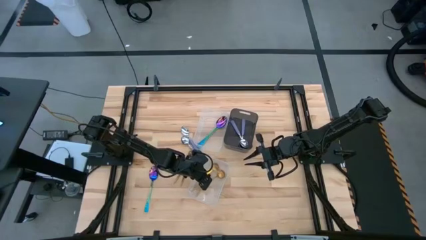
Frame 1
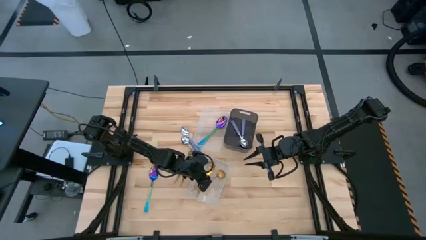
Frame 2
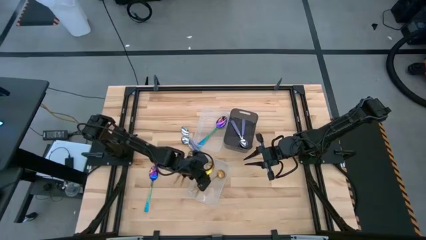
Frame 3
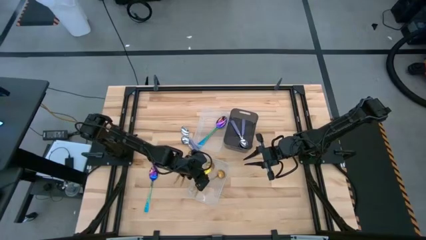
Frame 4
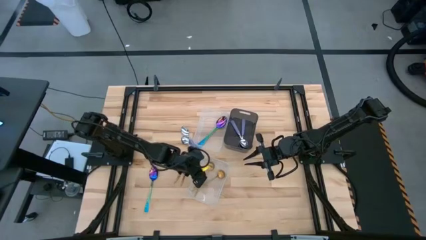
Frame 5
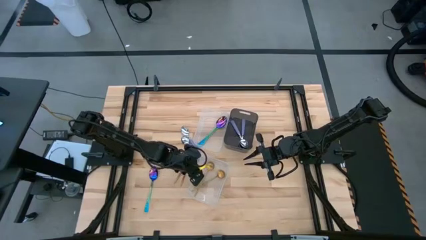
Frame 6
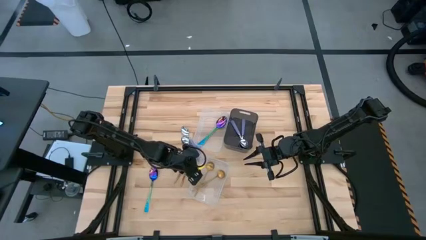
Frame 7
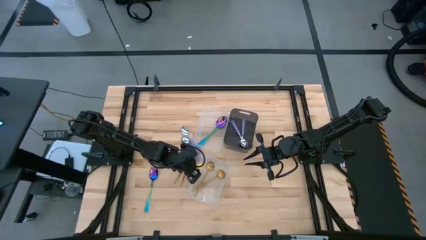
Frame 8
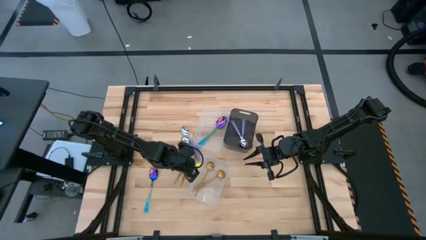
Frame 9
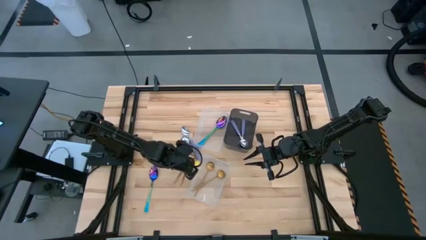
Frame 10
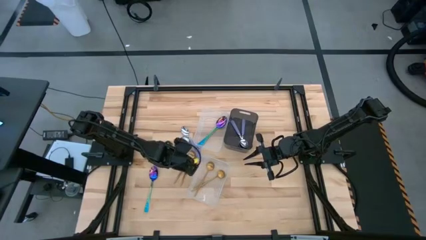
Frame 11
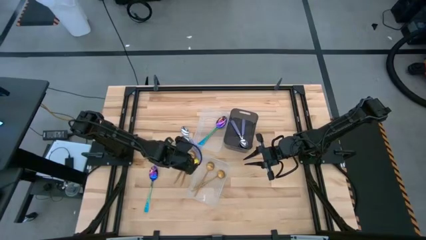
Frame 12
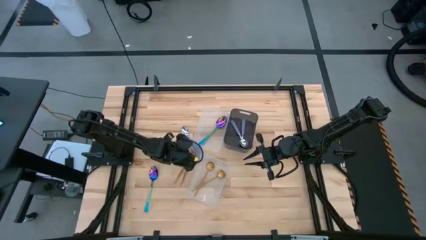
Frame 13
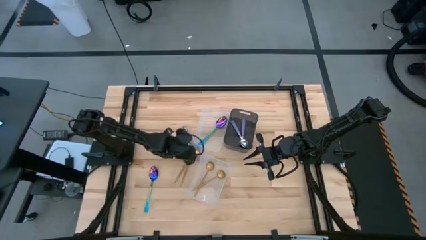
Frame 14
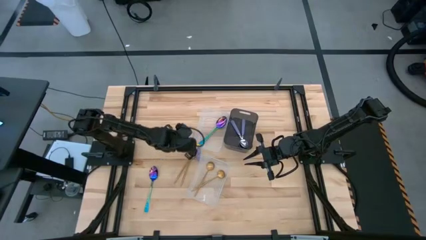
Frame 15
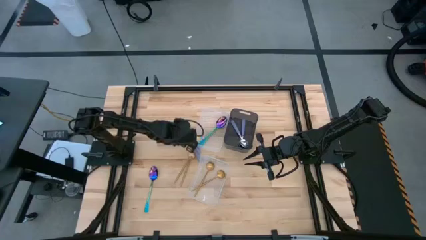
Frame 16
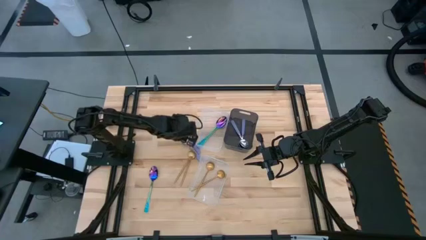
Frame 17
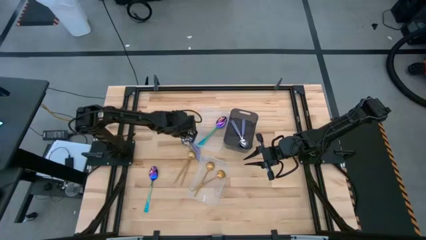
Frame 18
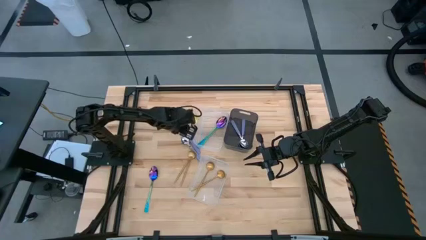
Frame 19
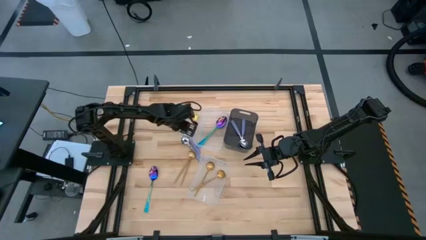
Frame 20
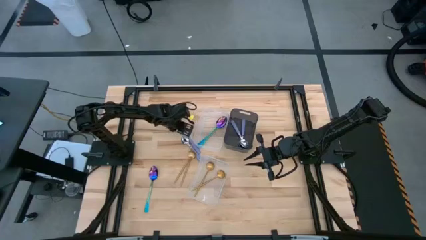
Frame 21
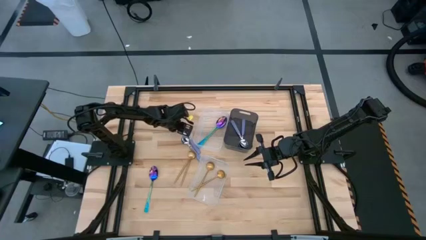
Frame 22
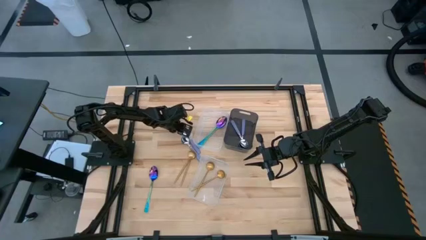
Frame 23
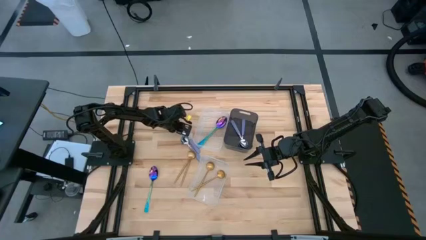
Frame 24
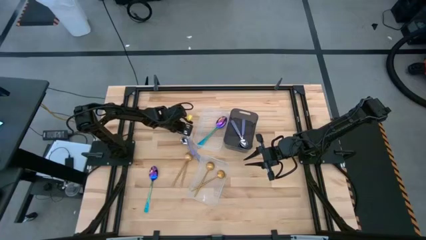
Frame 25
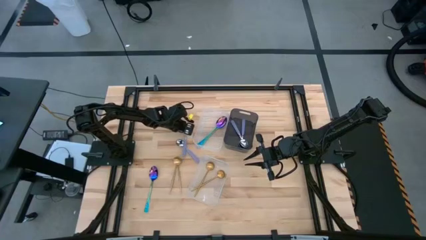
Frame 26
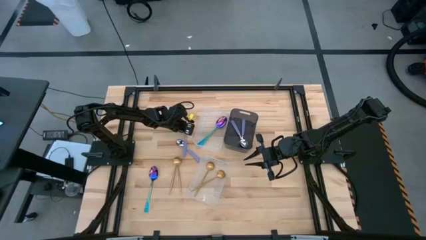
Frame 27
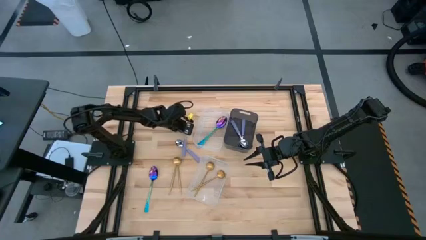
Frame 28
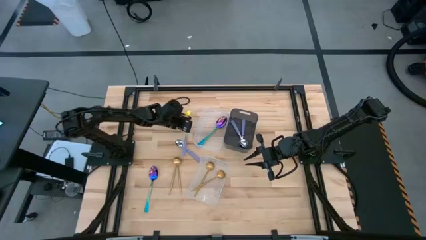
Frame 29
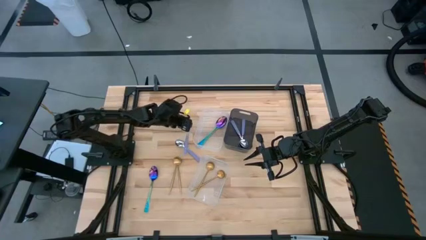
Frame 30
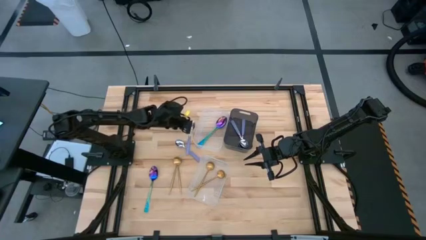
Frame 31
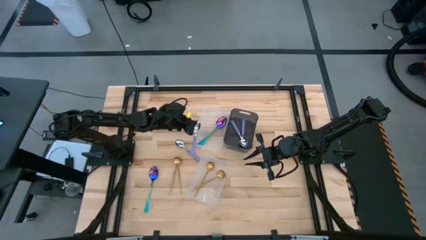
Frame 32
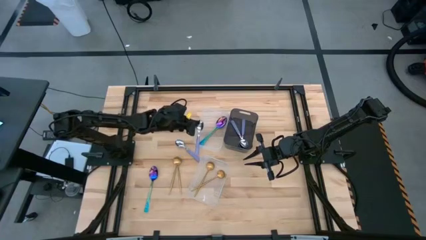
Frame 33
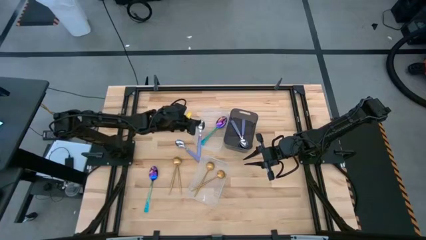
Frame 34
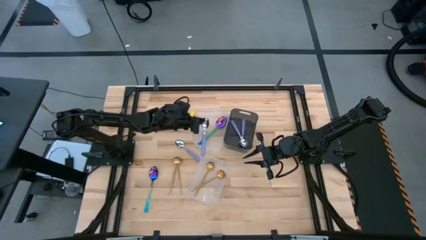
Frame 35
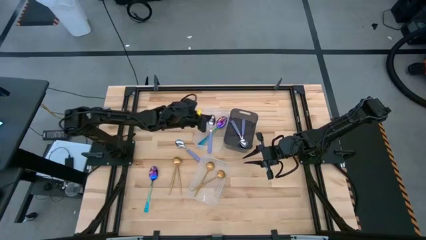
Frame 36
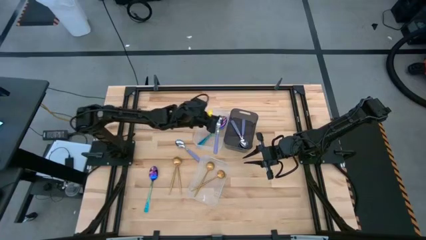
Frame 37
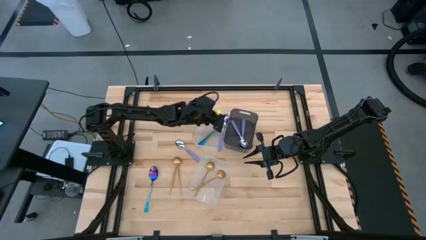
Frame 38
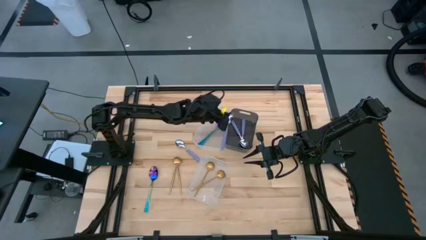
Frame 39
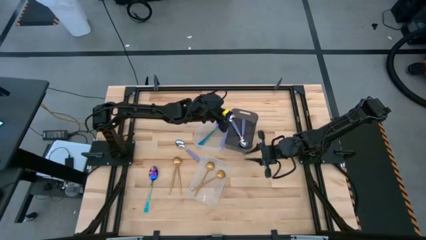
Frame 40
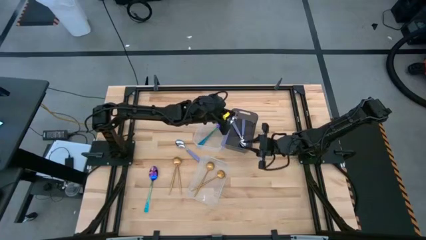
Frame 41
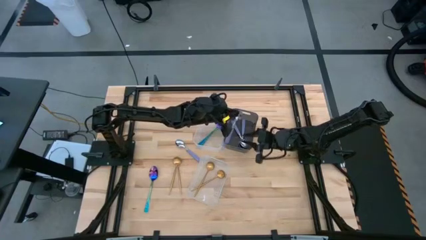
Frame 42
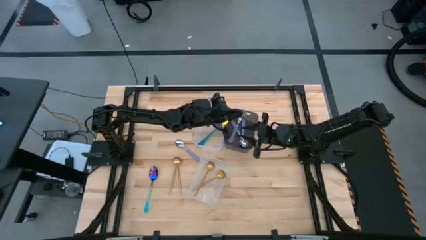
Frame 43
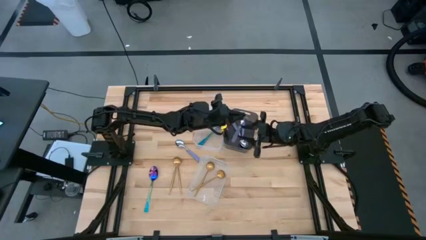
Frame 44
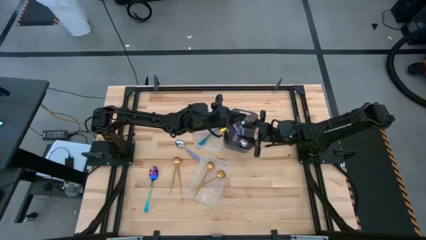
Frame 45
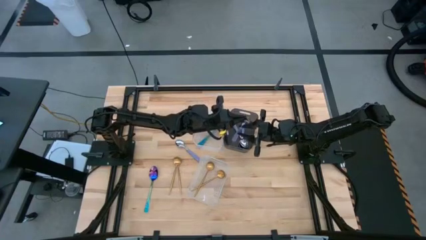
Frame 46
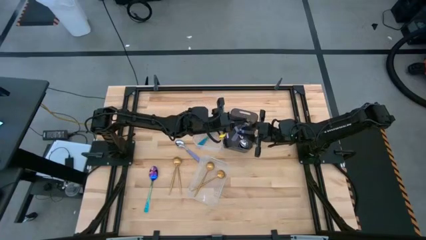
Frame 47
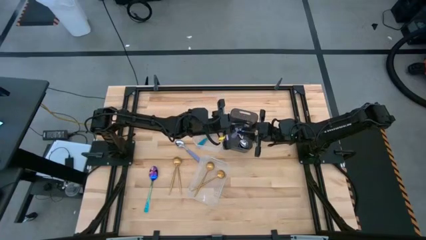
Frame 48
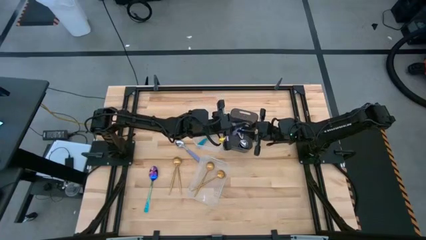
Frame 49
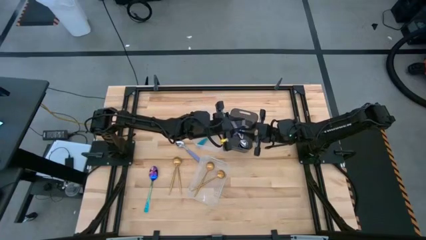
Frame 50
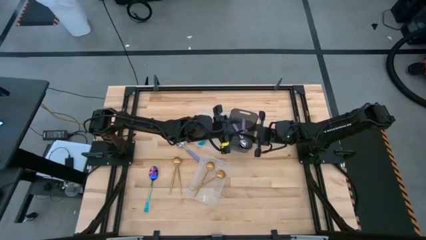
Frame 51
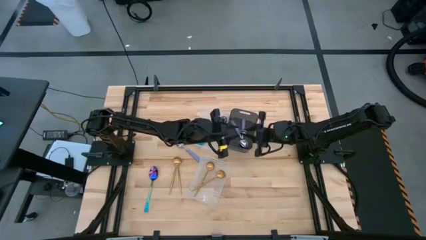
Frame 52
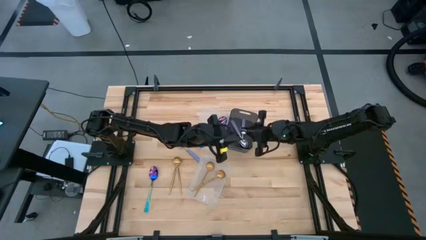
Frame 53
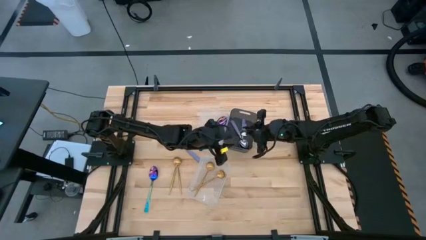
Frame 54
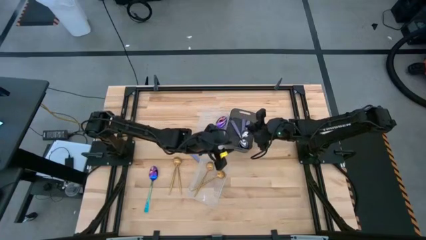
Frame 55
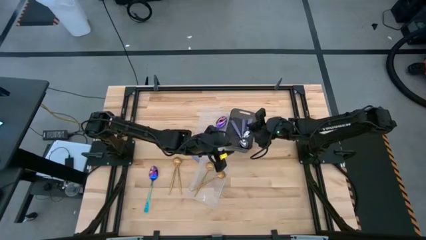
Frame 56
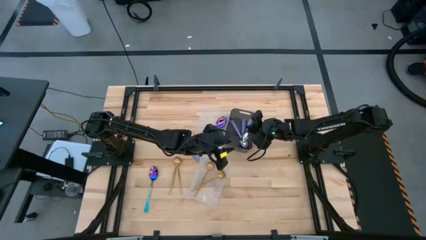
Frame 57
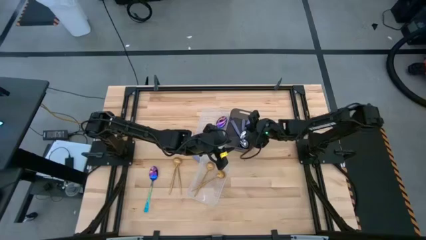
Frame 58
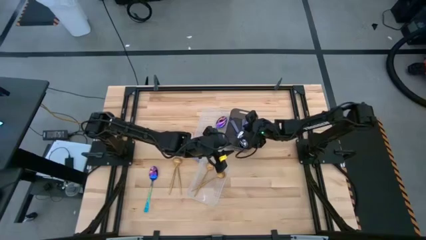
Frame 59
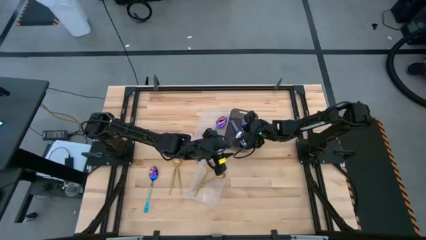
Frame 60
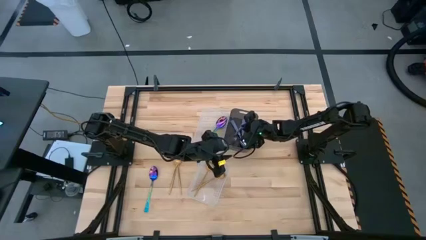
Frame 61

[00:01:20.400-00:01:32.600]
Task: Sort silverware by color (type)
Put the purple spoon into the black bin

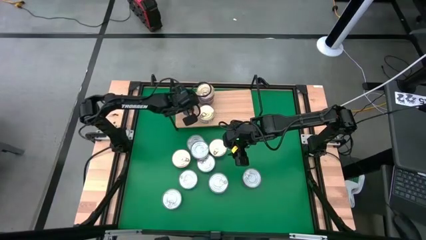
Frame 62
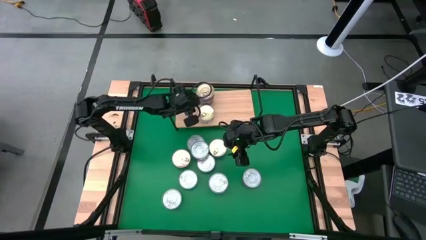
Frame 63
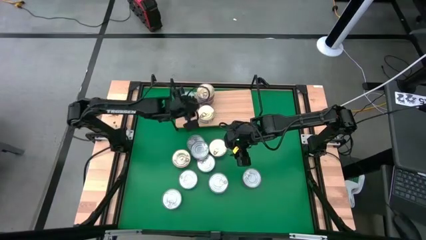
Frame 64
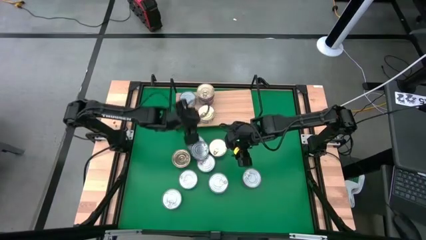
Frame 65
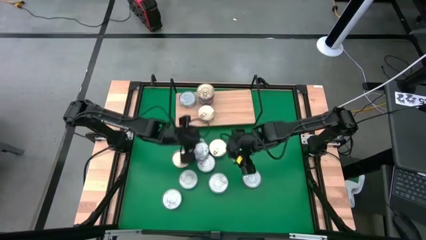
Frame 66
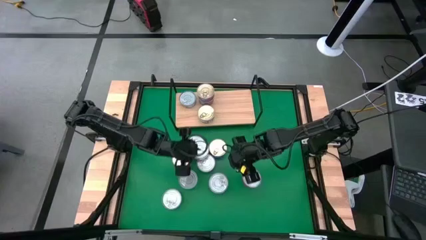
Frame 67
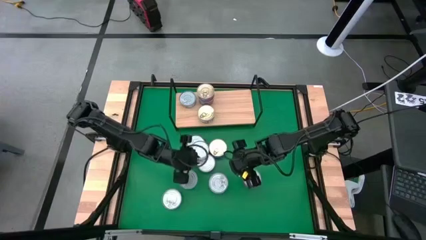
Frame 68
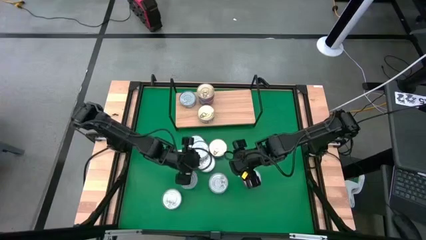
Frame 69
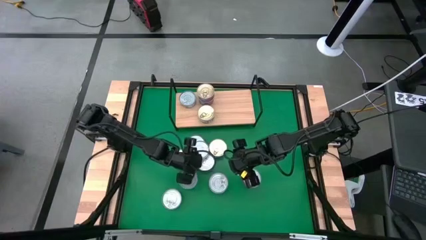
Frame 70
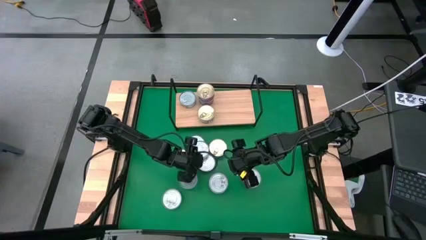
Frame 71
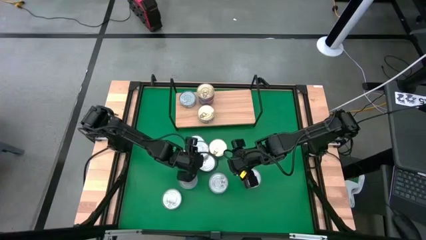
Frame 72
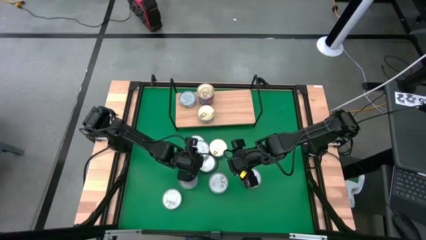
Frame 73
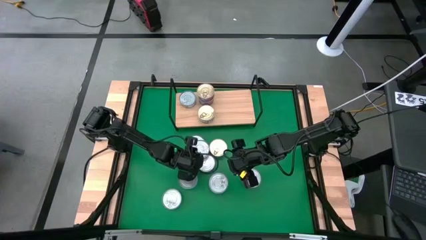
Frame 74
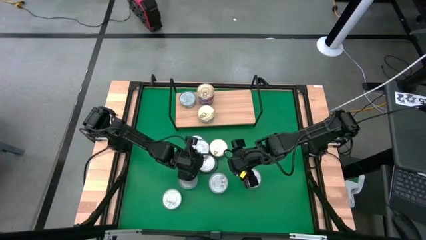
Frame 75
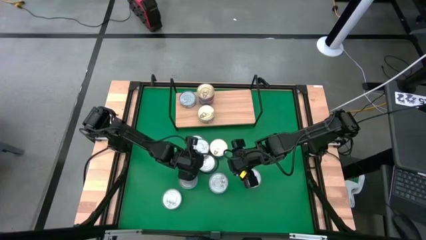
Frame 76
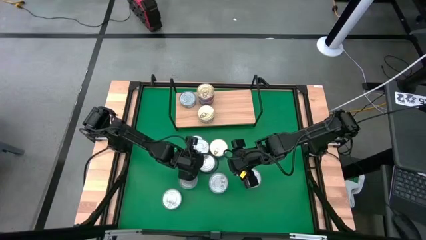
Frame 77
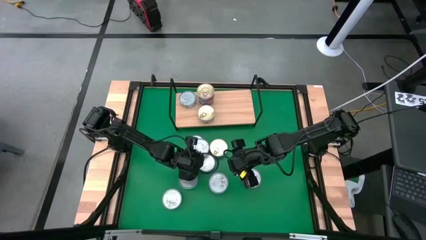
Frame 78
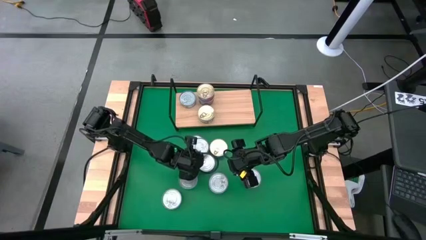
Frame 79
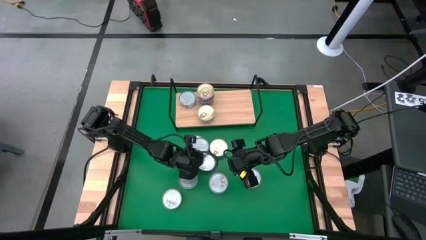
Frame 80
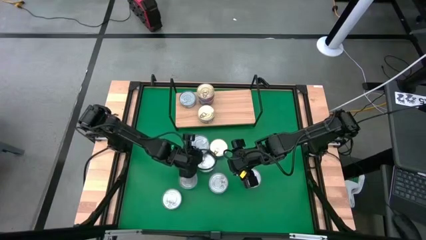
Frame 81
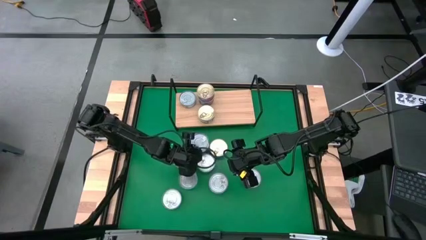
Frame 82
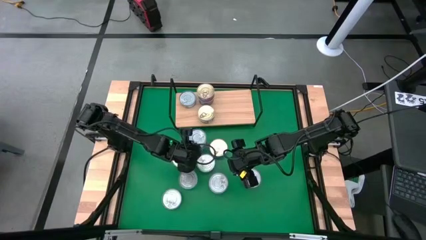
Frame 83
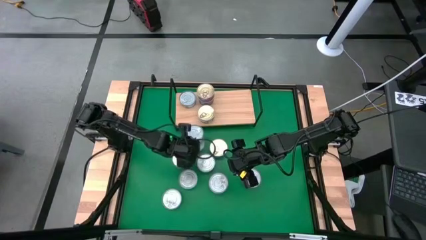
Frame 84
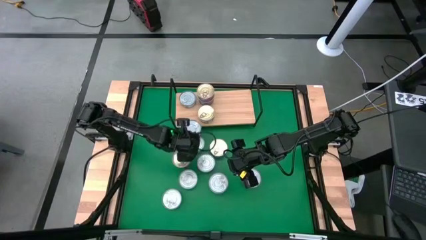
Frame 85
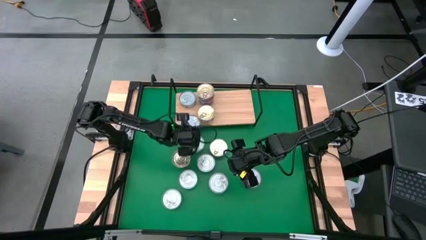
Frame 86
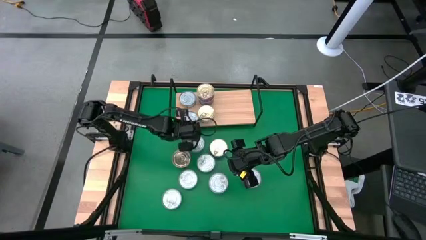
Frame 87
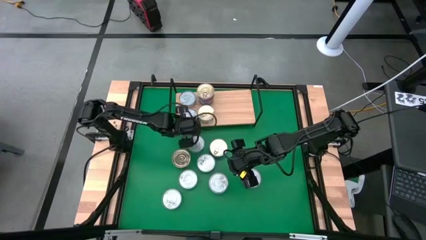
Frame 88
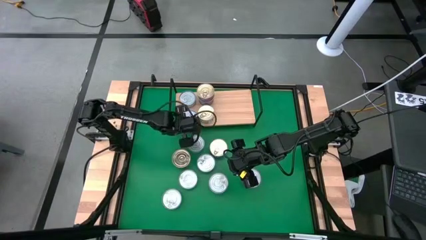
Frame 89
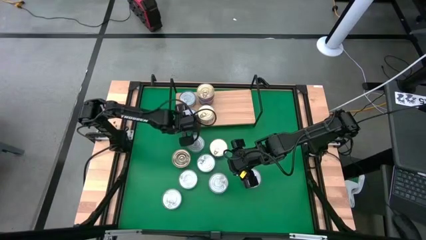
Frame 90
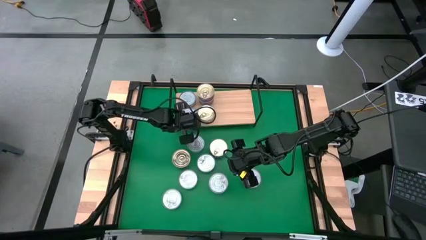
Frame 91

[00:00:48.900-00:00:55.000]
Task: Stack canned seafood by type on shelf
Put the red tuna can on the shelf
